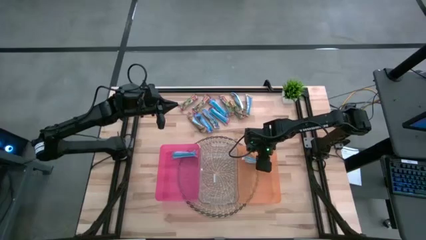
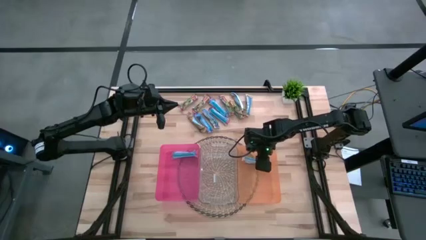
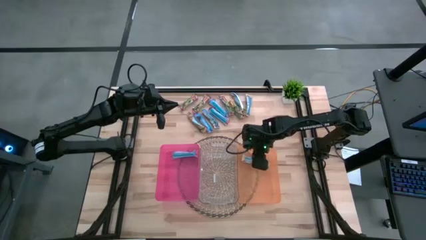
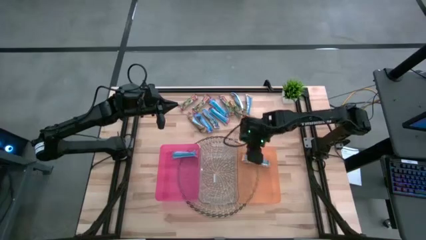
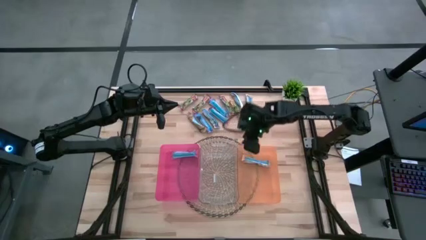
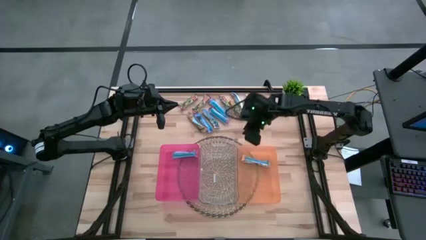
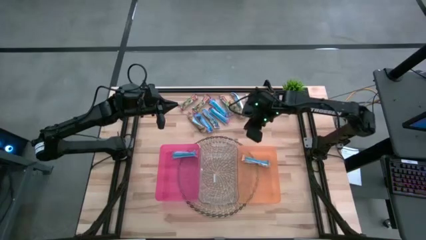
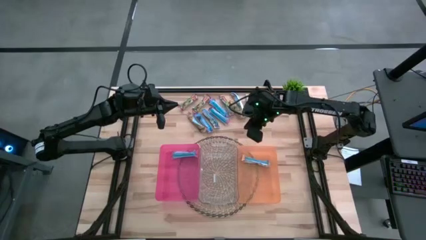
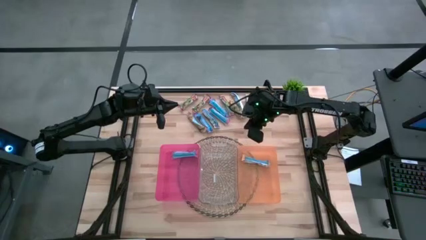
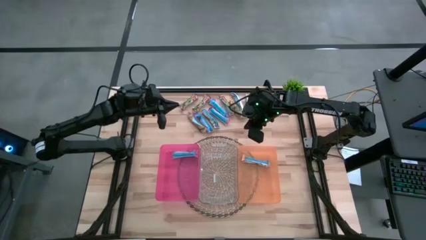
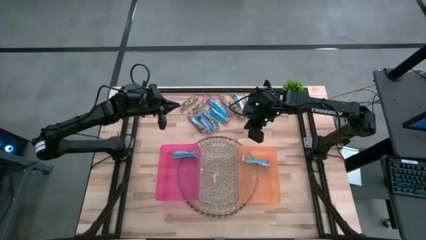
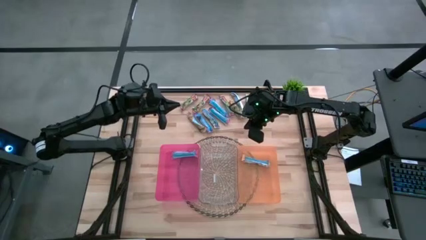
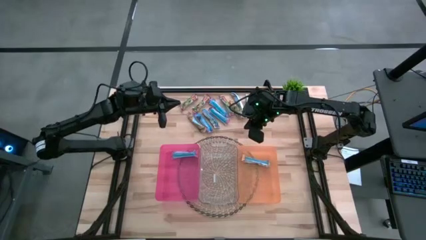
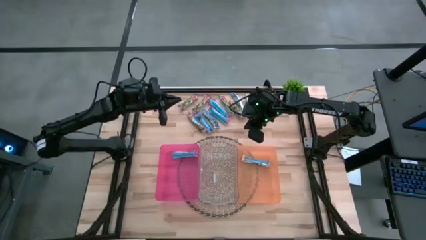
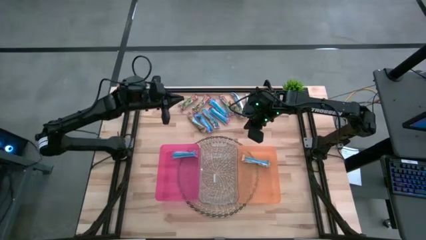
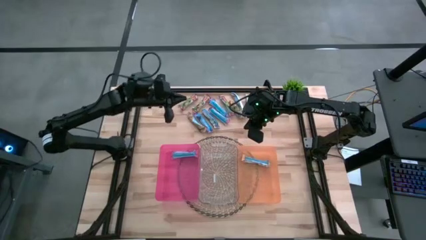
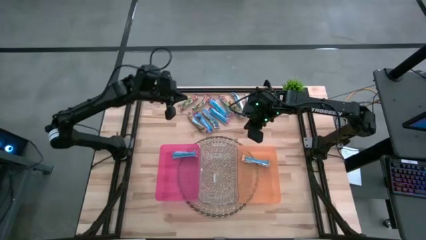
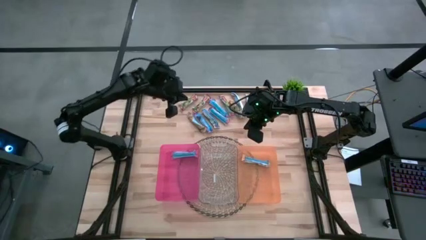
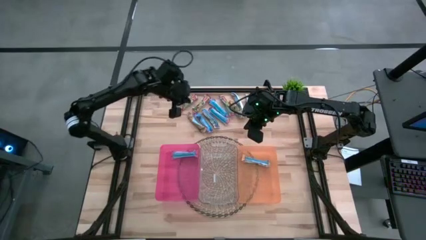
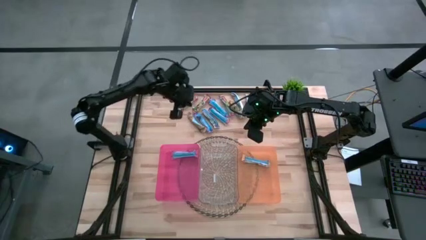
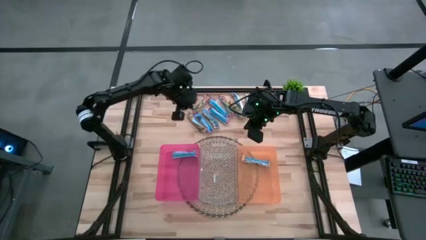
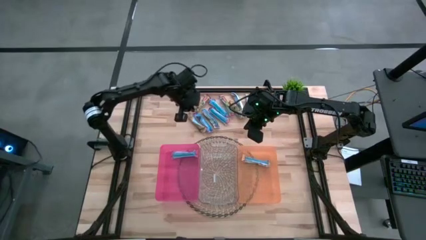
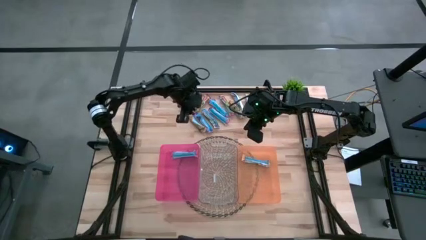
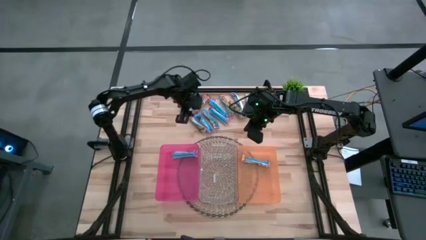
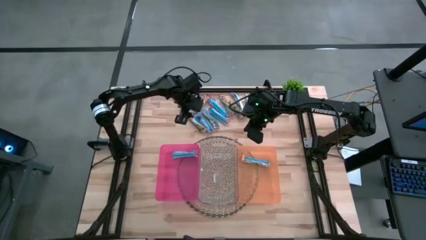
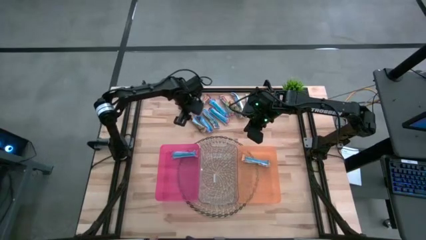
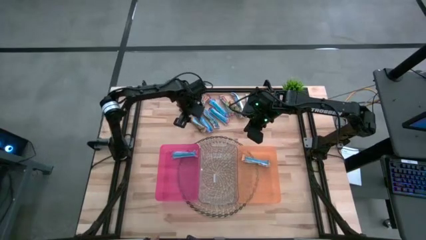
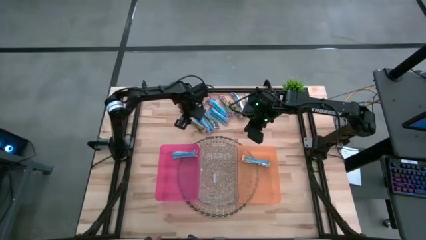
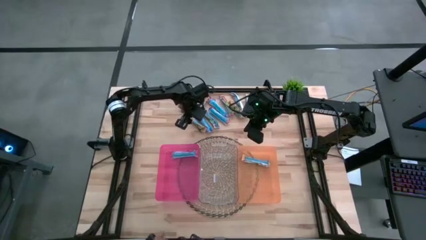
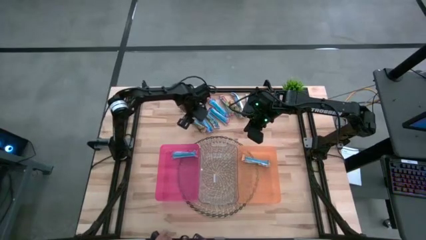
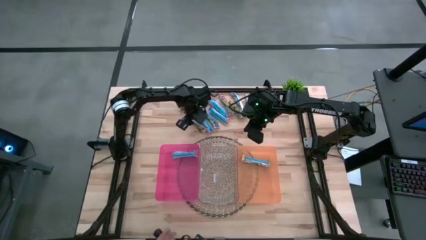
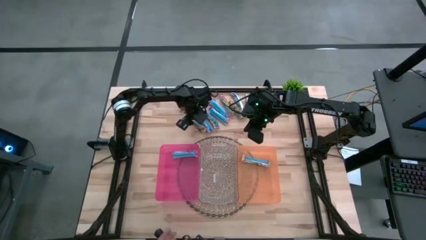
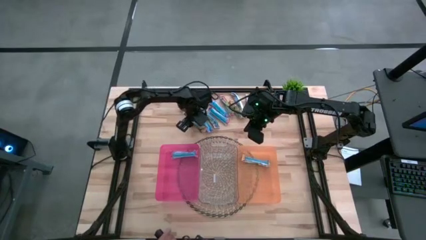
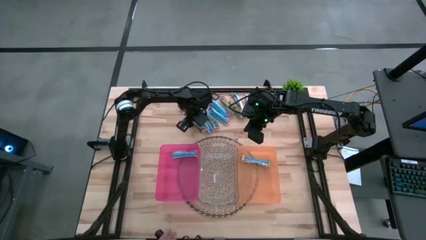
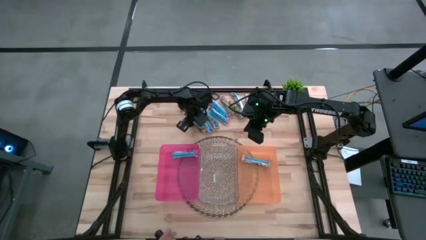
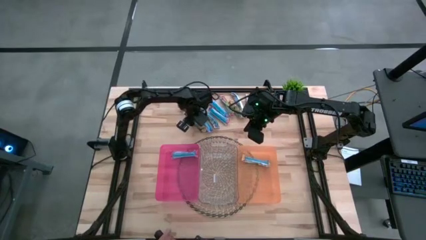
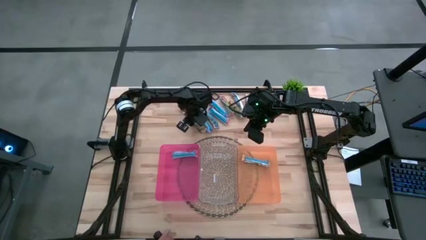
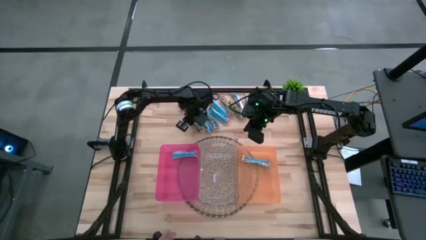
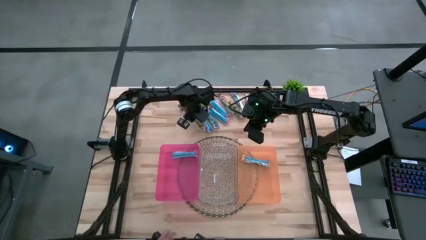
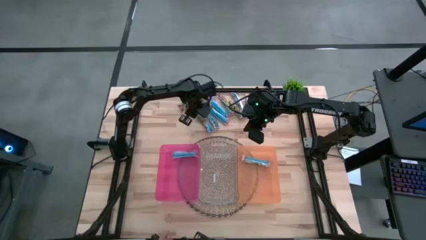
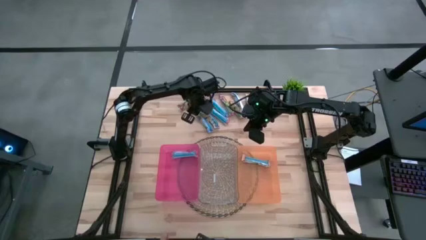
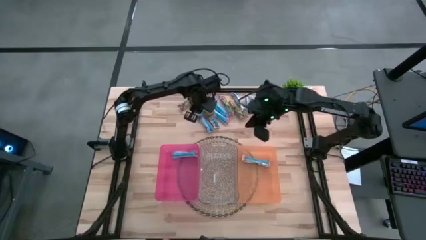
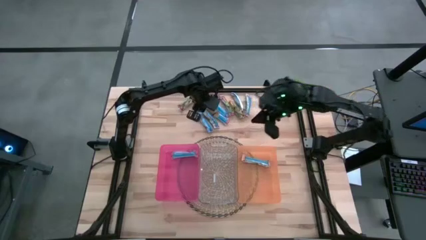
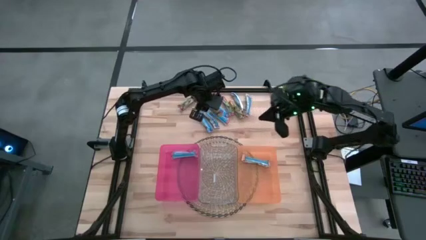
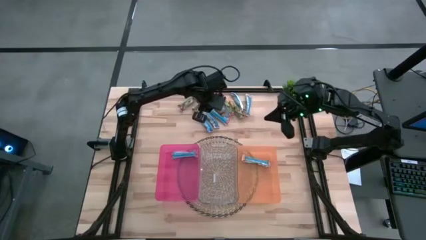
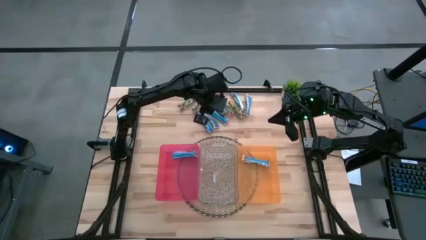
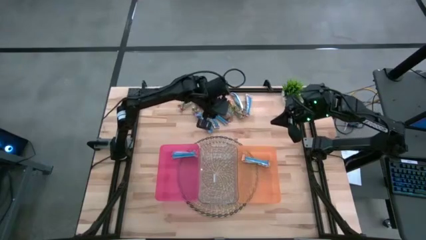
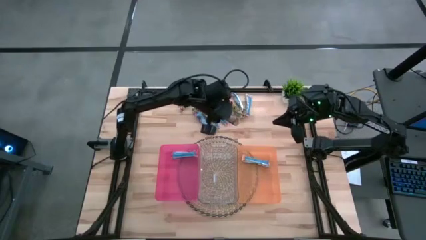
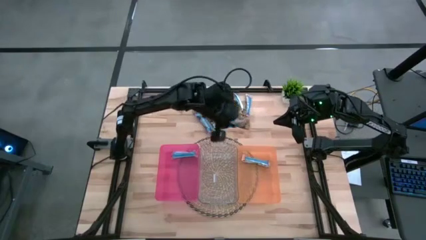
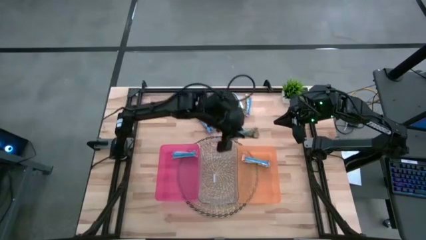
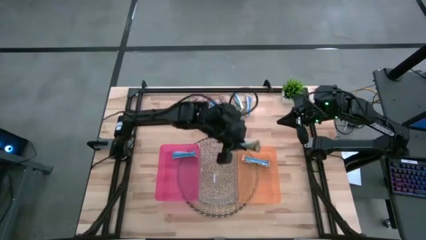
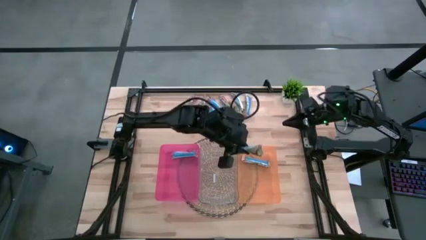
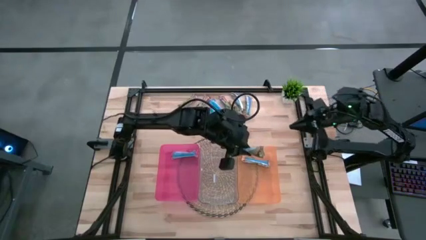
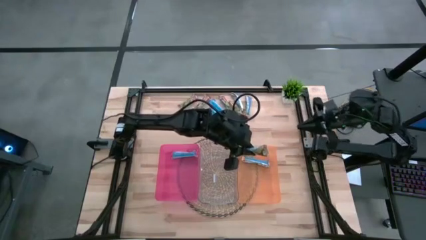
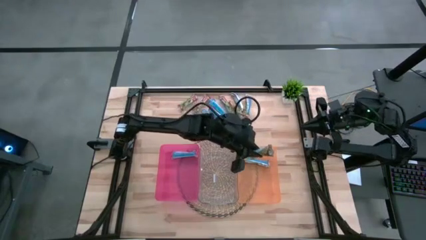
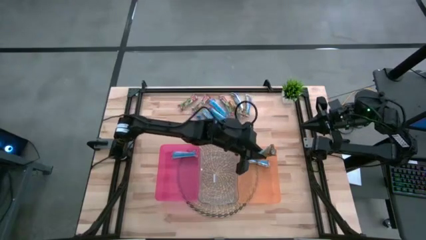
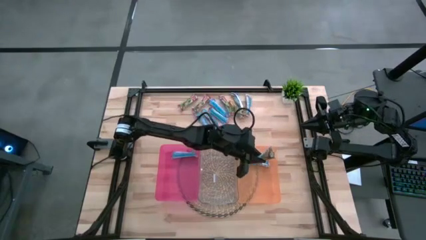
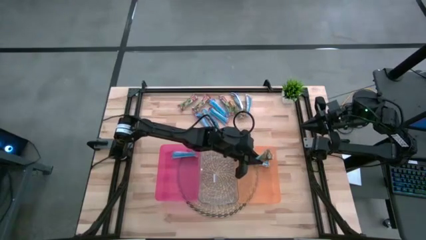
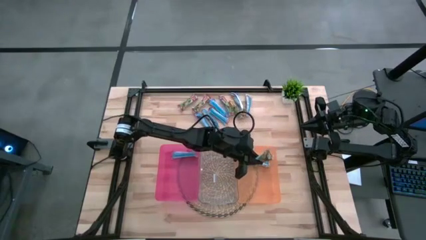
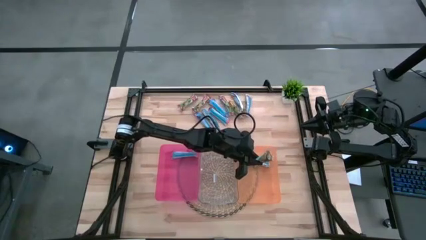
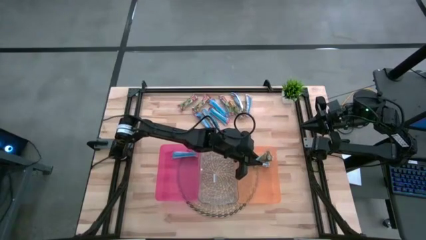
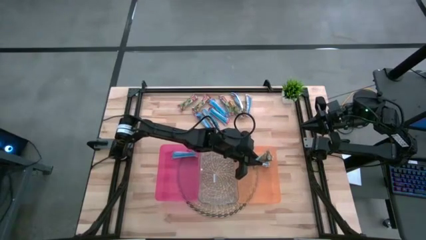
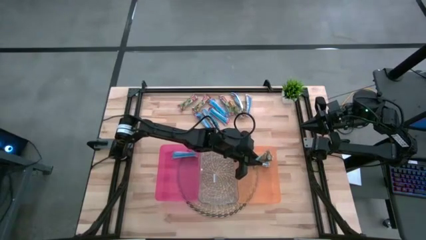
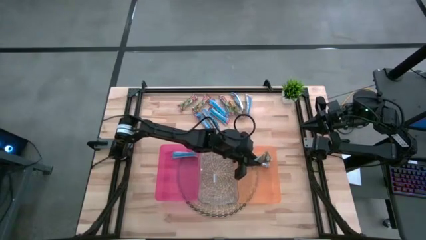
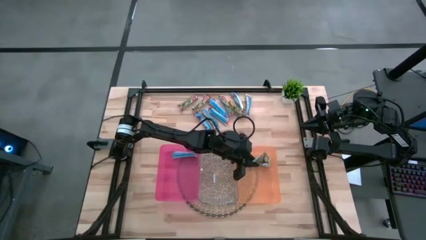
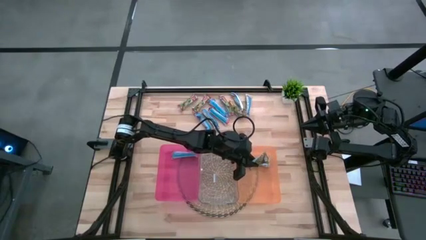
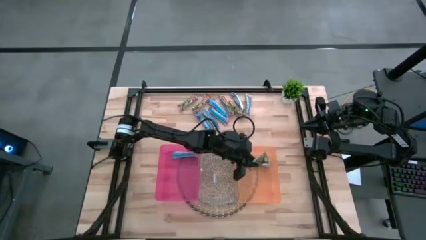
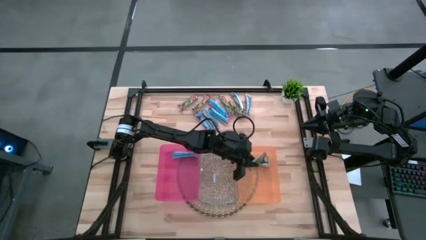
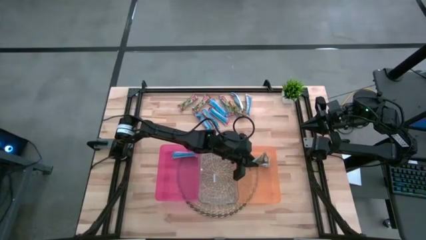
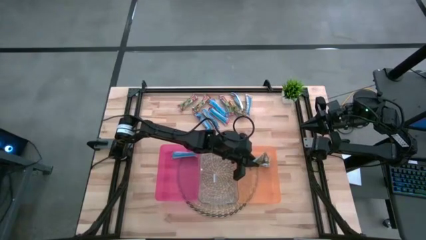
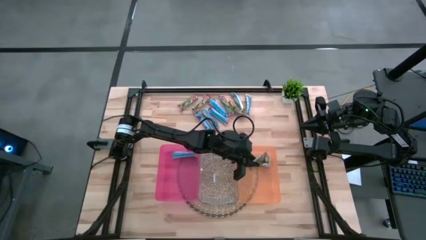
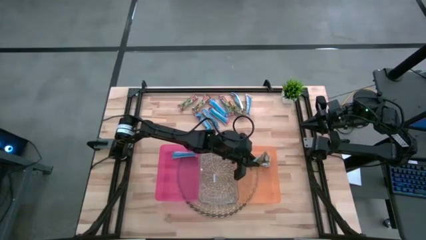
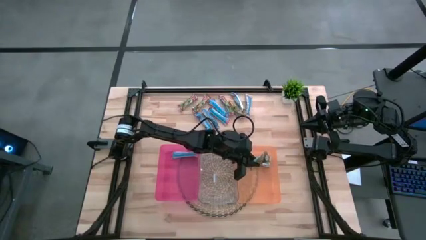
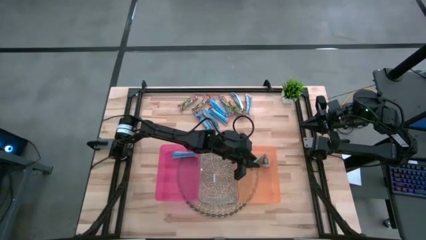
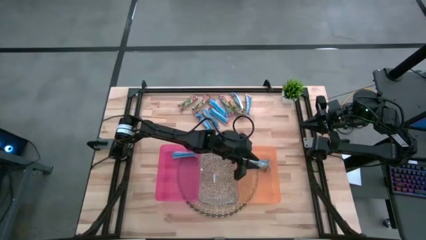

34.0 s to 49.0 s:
Task: Pick and place Granola Bars by type
Put the yellow granola bar into the orange bin
